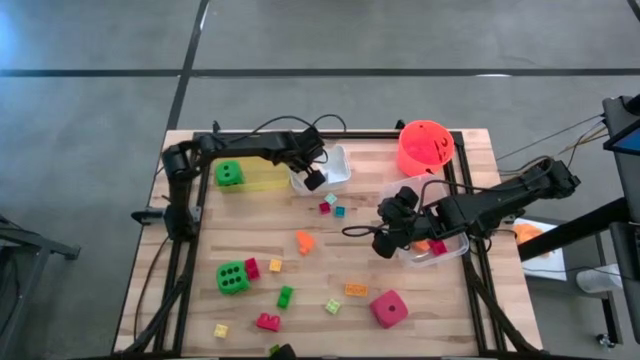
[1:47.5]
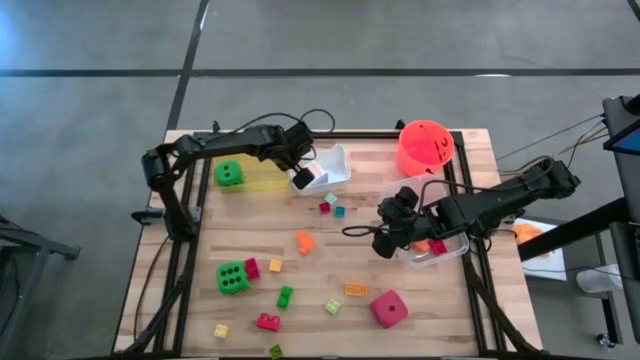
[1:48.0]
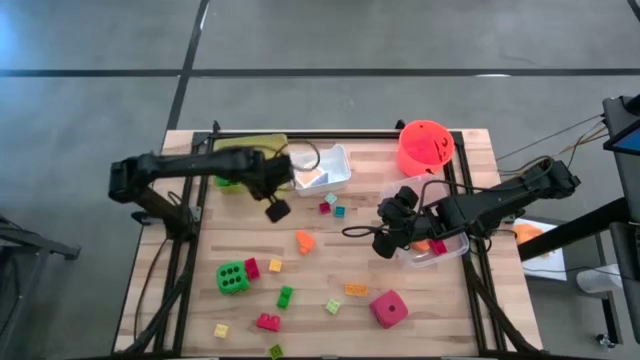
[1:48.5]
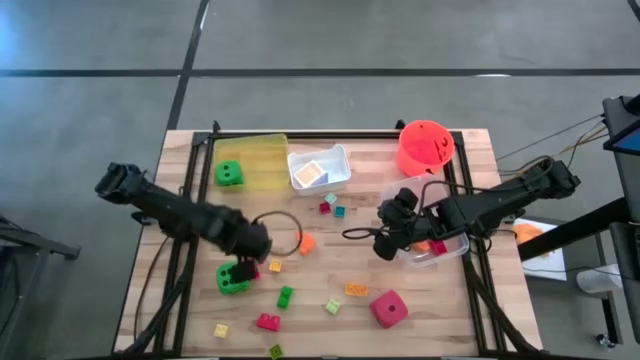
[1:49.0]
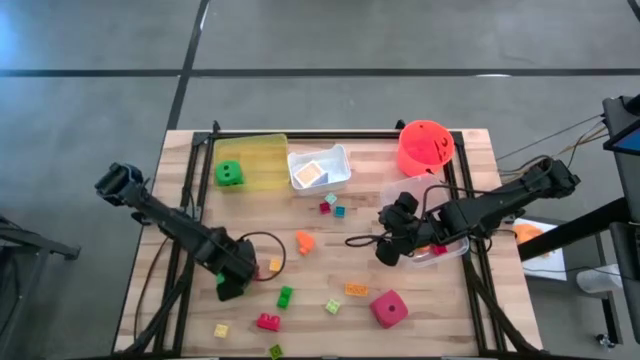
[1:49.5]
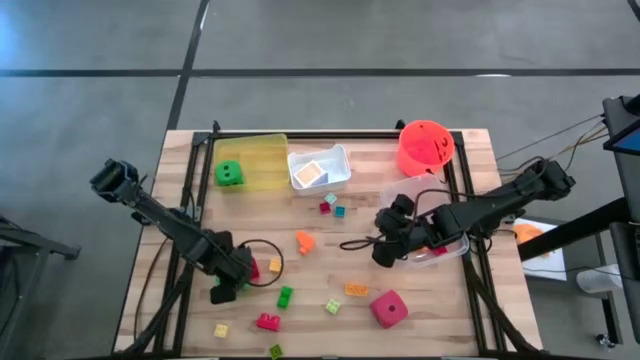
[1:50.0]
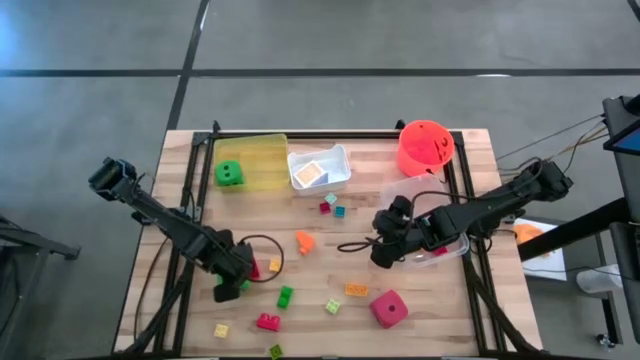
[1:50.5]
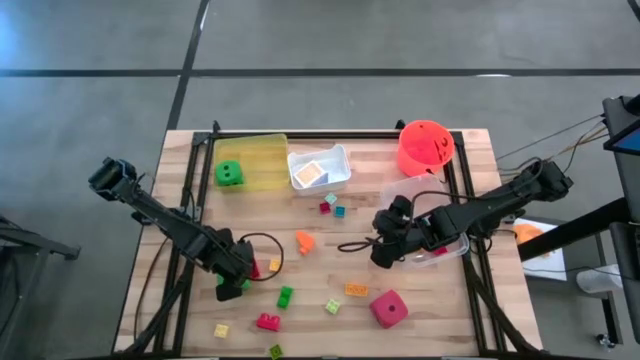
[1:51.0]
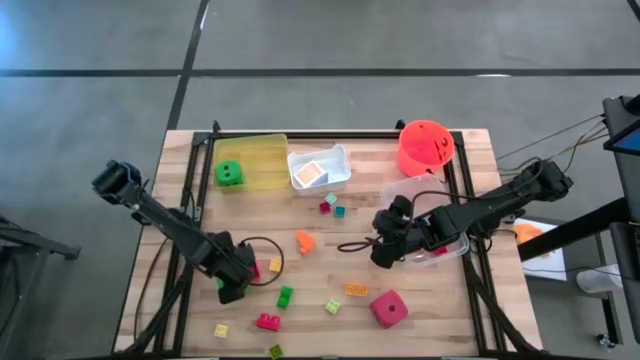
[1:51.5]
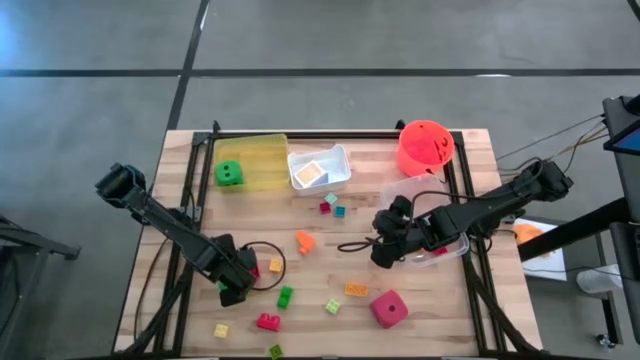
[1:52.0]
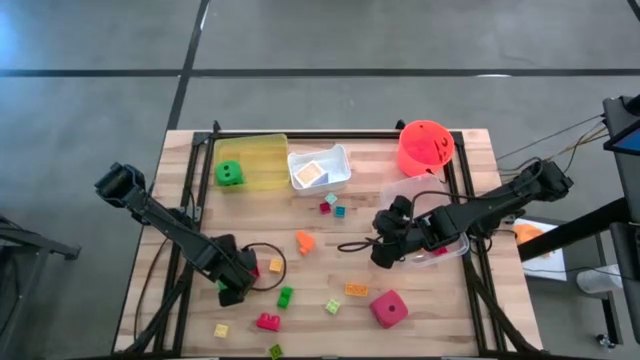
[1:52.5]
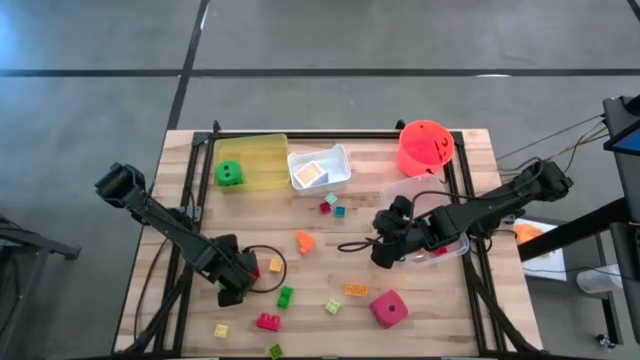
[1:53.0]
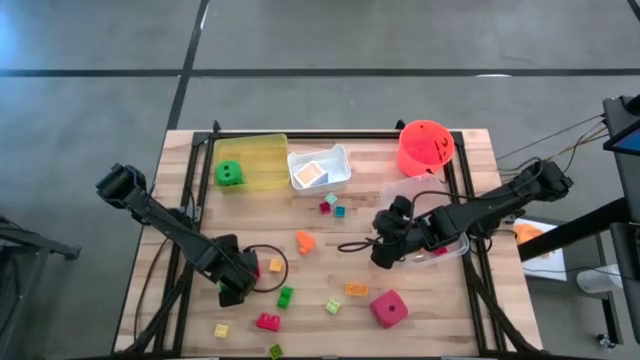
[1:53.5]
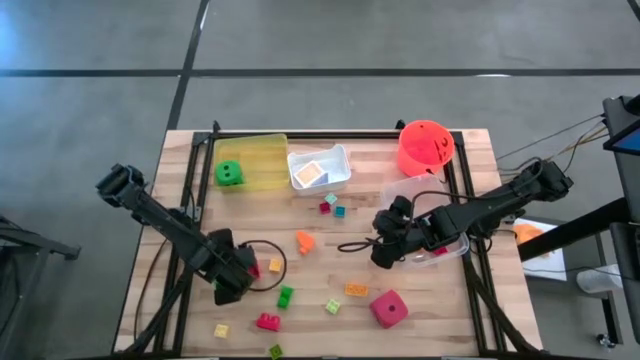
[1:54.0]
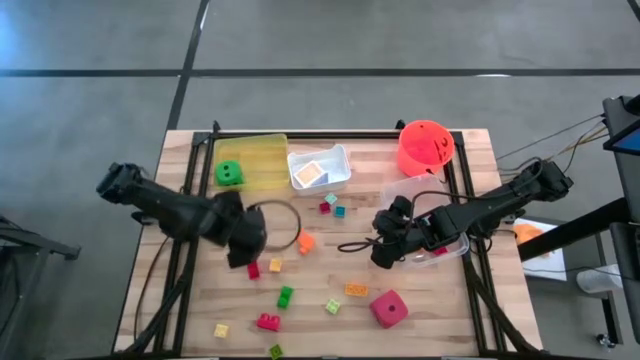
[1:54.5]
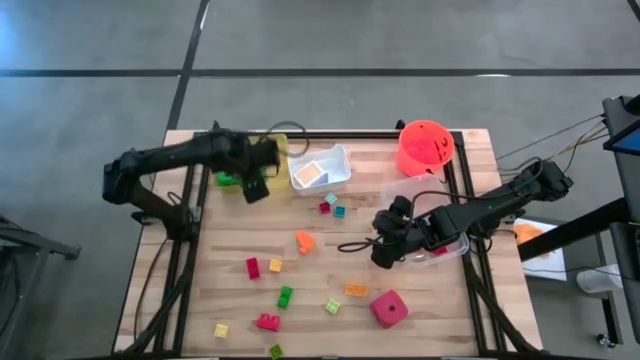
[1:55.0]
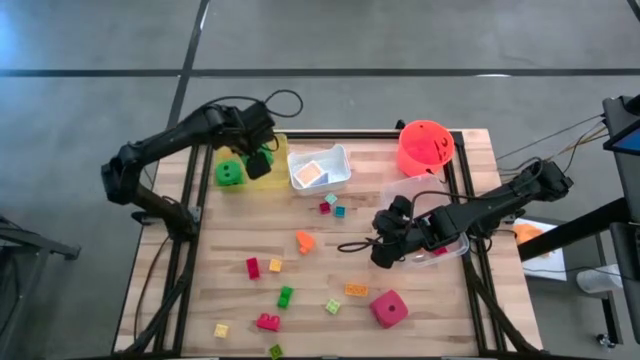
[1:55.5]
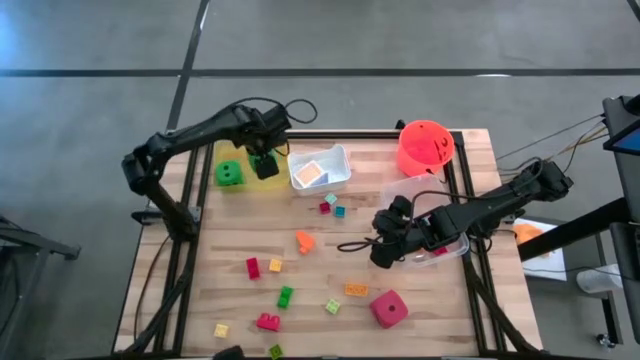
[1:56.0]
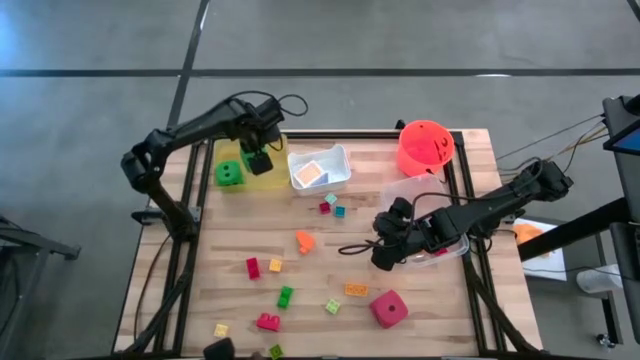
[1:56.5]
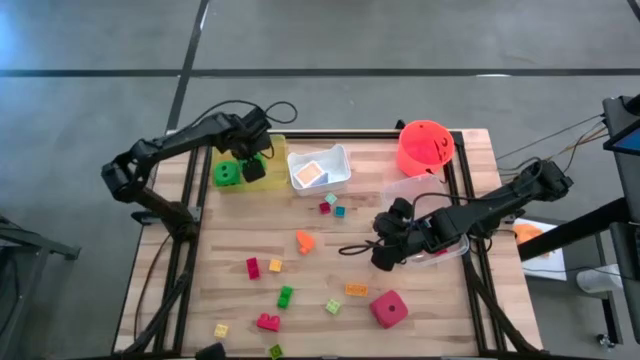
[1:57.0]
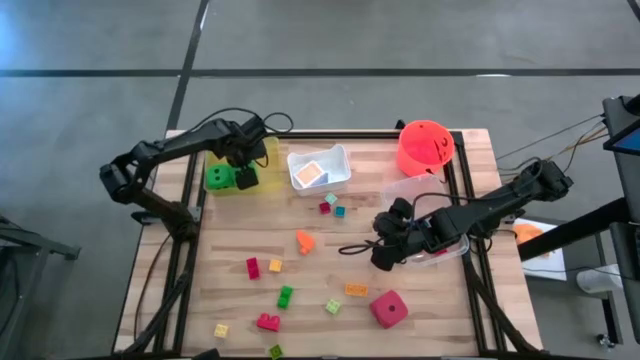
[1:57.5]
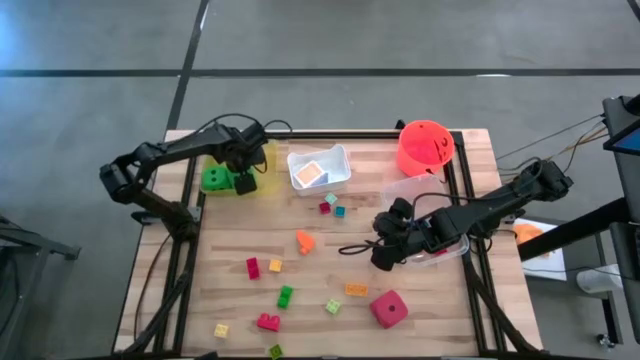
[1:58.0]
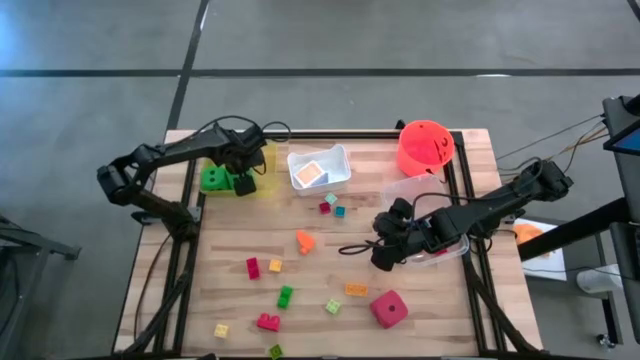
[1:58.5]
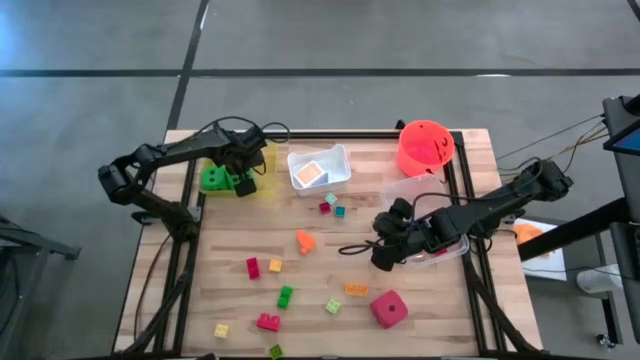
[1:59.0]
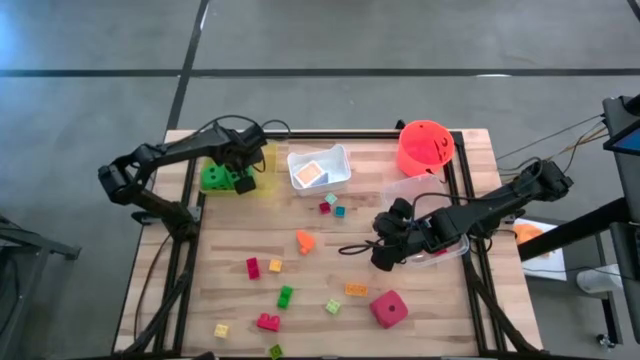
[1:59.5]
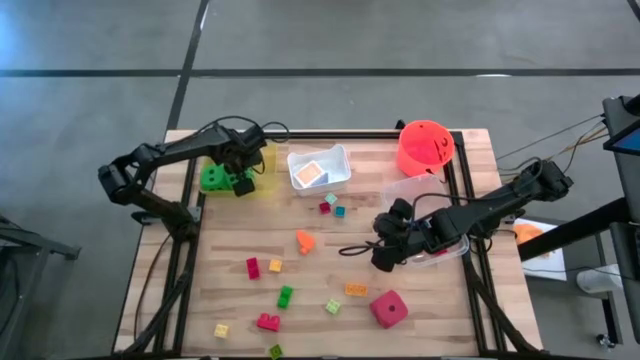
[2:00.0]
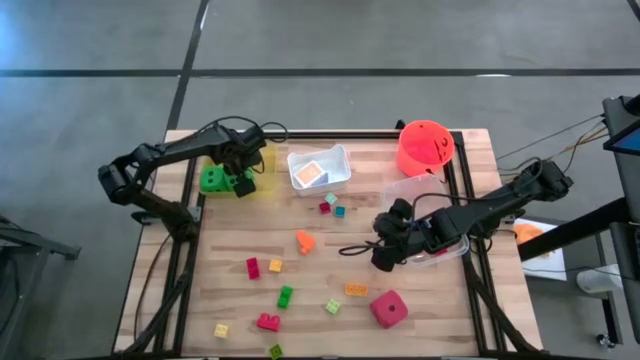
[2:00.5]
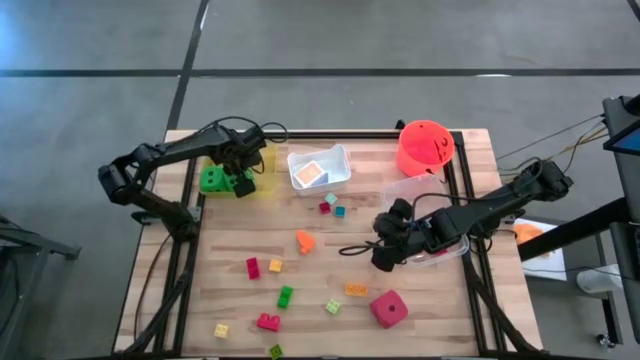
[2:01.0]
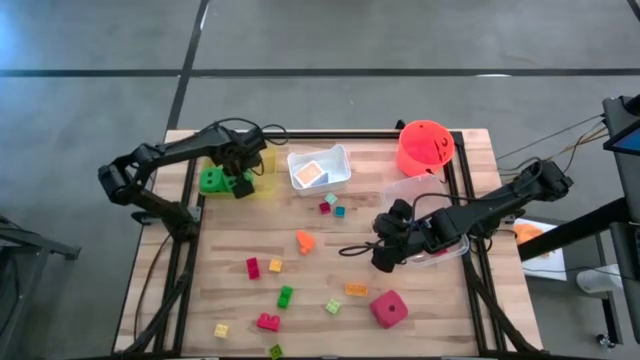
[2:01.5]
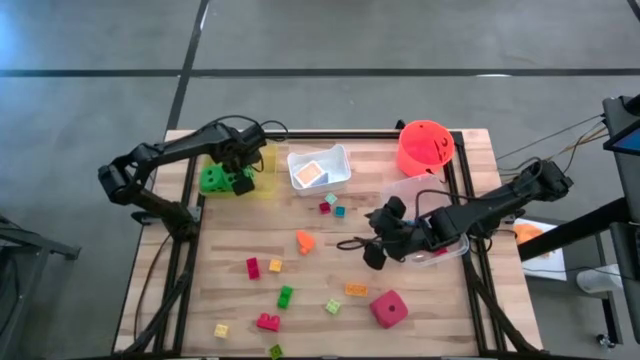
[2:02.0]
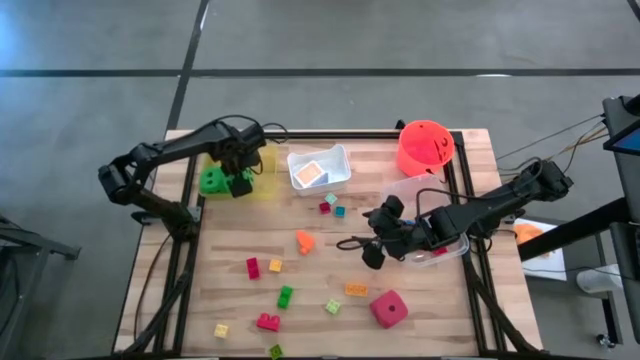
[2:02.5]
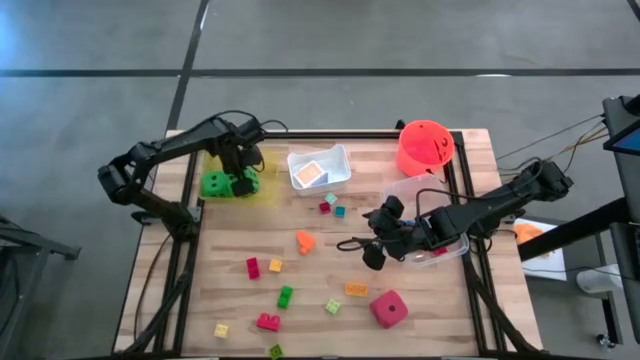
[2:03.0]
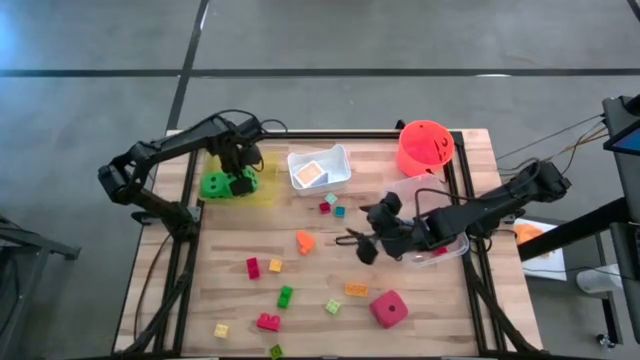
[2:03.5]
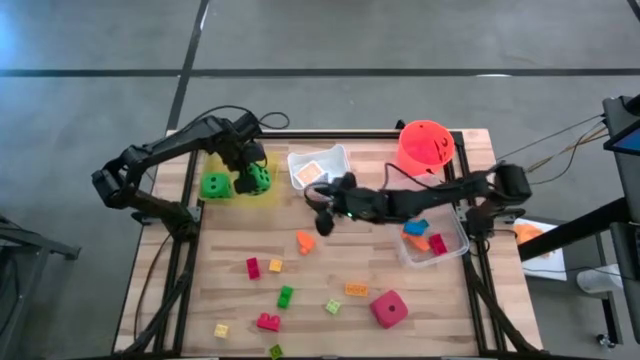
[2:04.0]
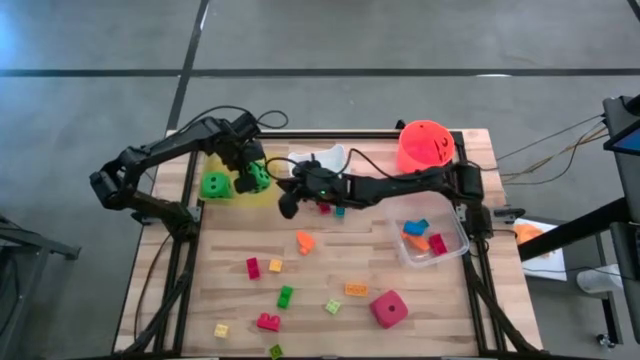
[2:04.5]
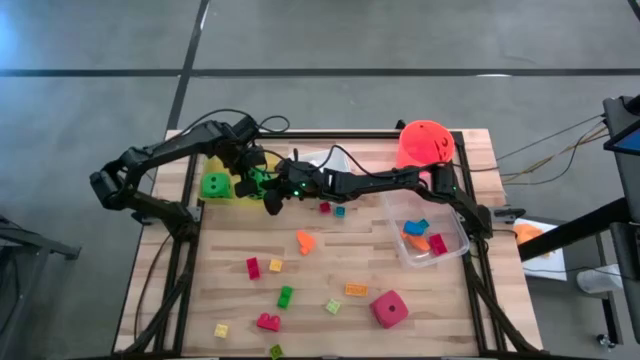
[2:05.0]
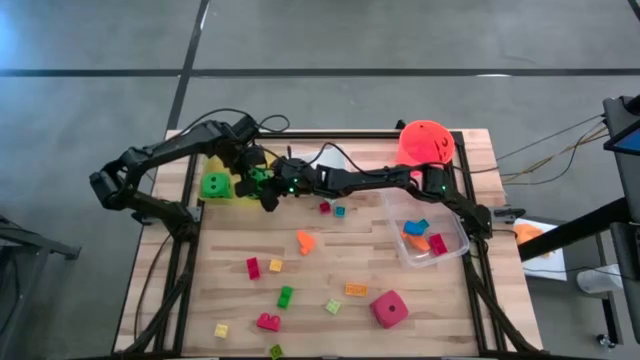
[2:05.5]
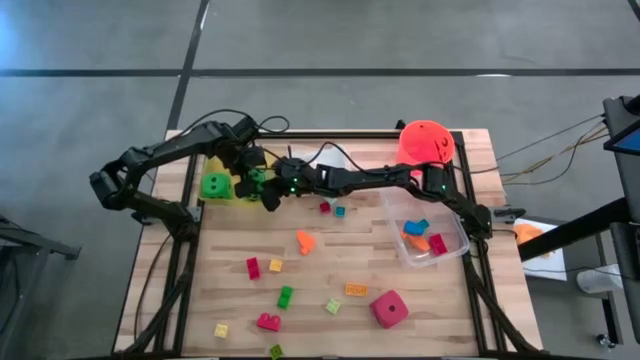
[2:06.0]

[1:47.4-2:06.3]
Task: Pick & Place Toys
Put the green dice into the yellow bin
